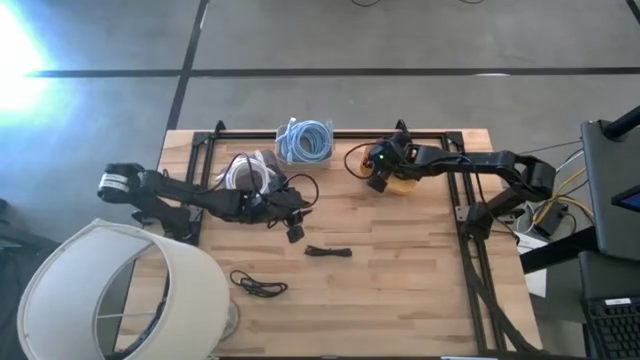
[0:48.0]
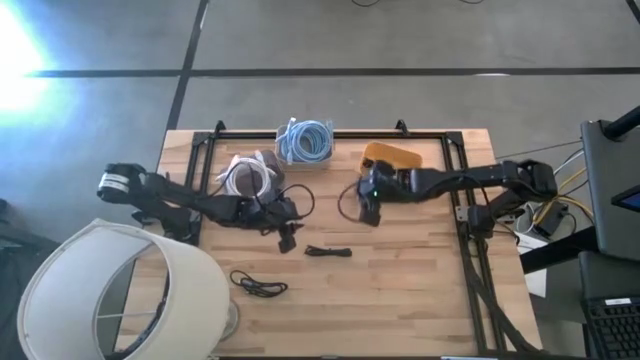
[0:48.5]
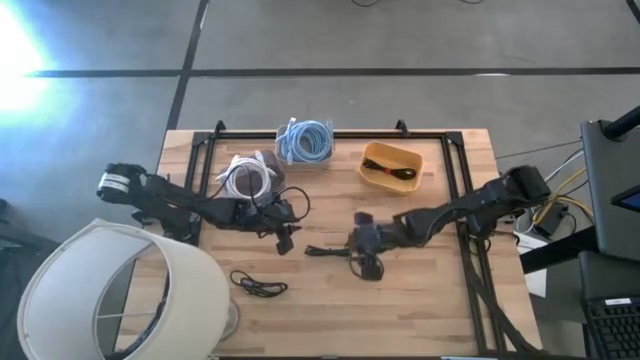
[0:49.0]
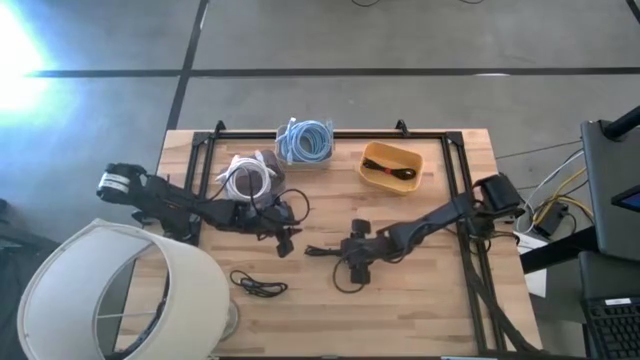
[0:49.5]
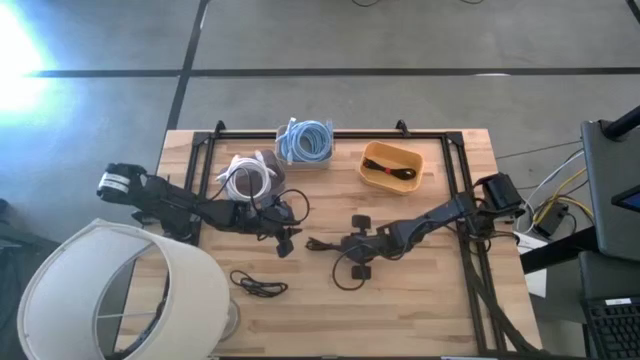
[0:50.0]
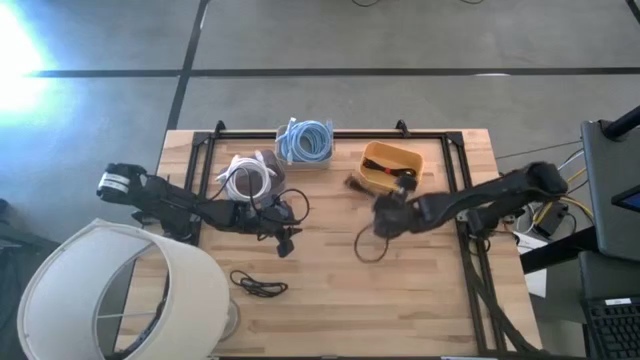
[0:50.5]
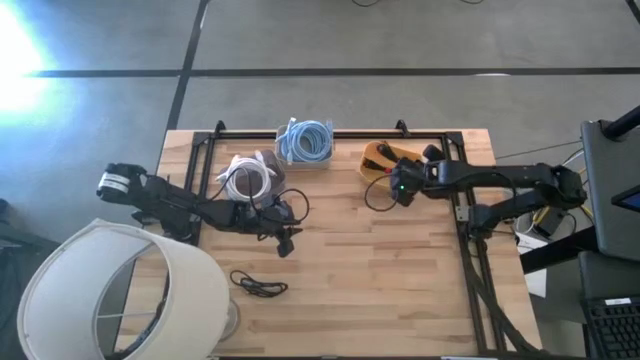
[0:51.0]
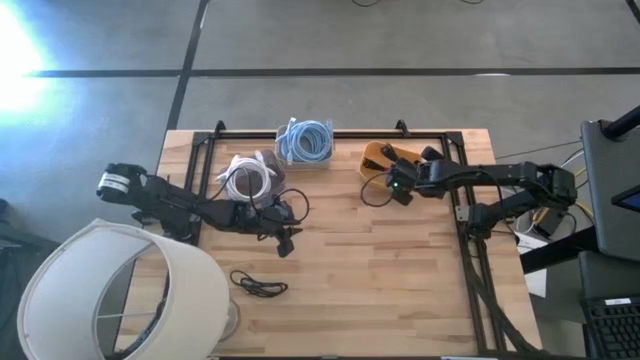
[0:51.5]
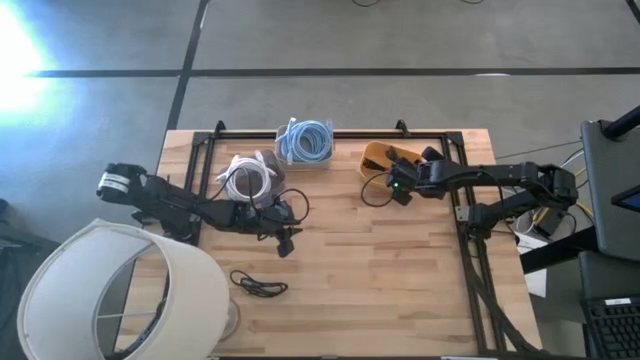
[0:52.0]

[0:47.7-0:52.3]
Task: Pick & Place USB Port
Put the right black USB cable into the yellow bin

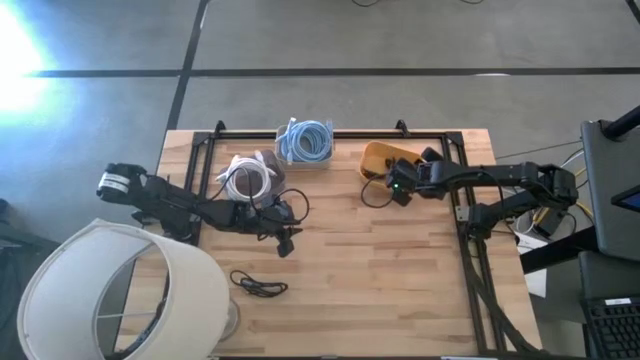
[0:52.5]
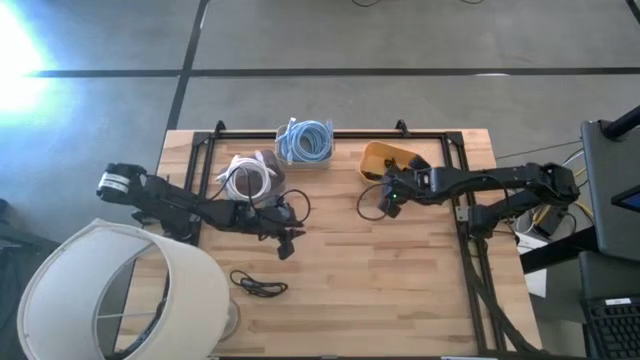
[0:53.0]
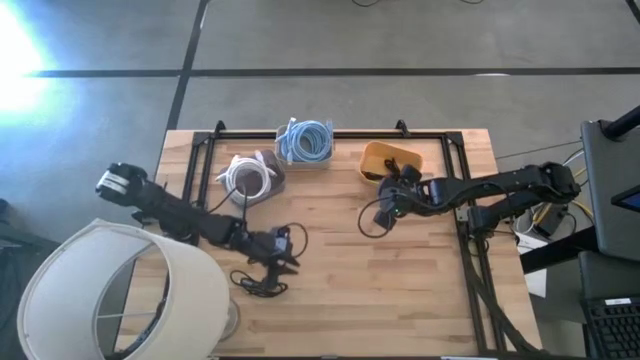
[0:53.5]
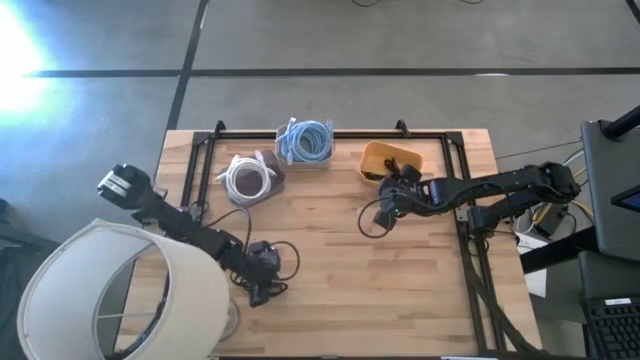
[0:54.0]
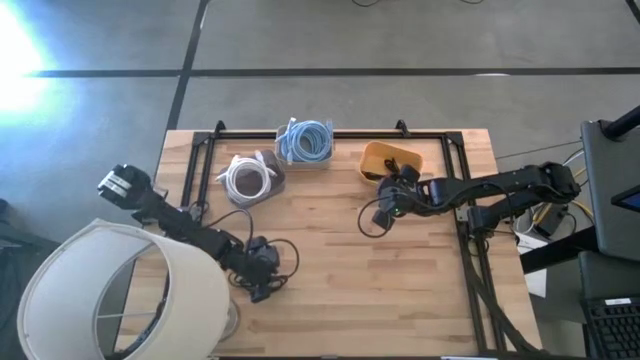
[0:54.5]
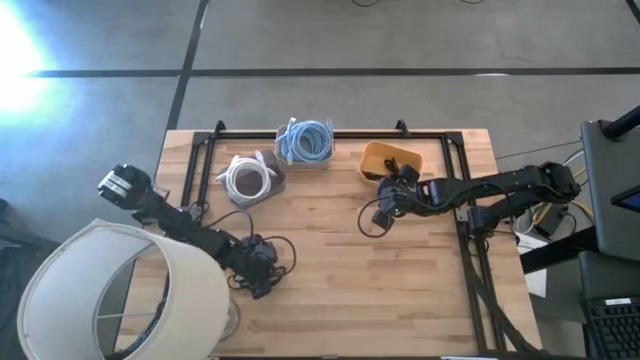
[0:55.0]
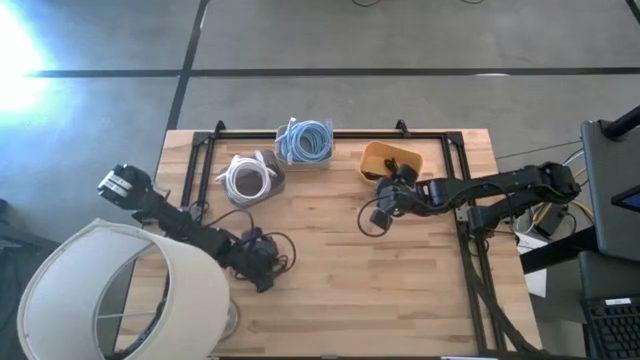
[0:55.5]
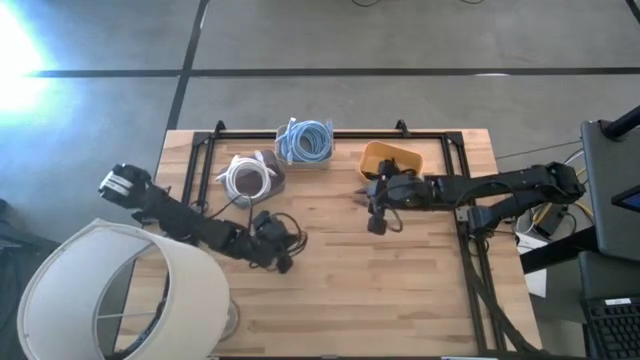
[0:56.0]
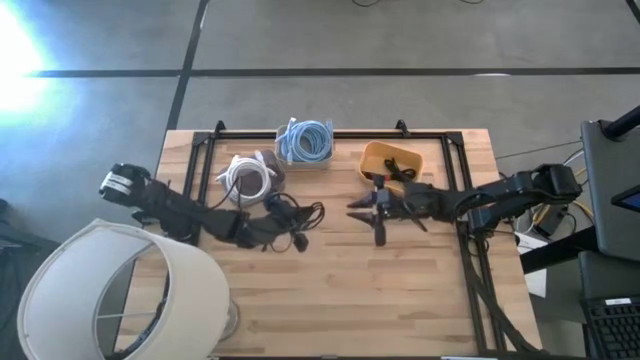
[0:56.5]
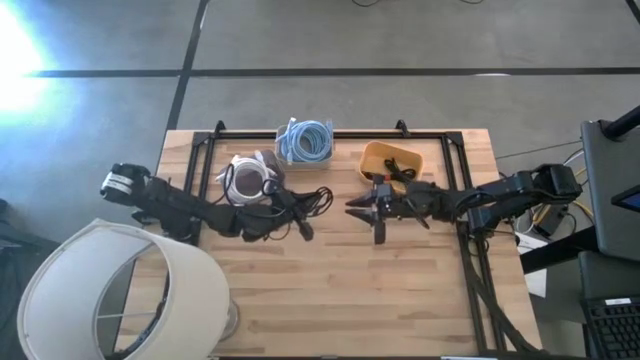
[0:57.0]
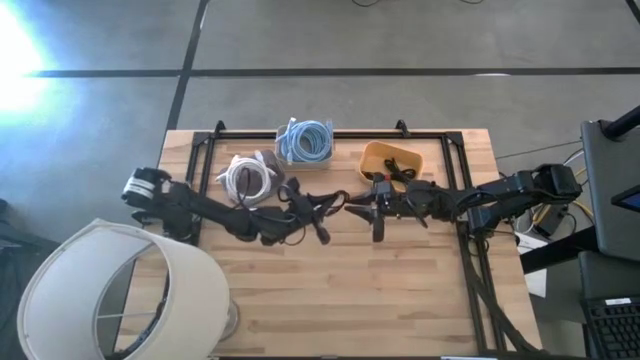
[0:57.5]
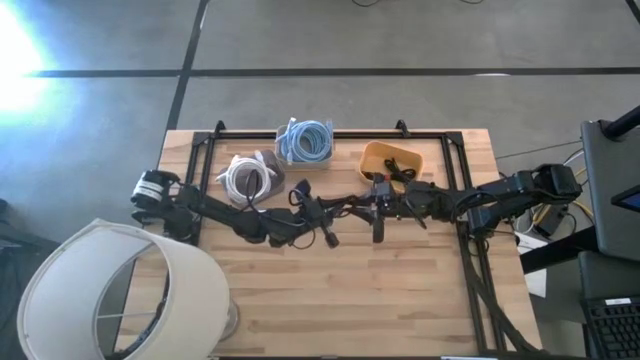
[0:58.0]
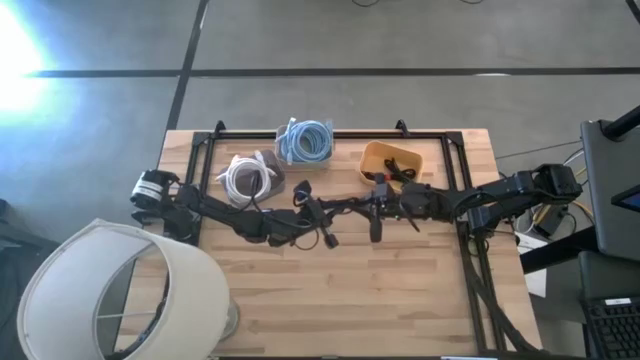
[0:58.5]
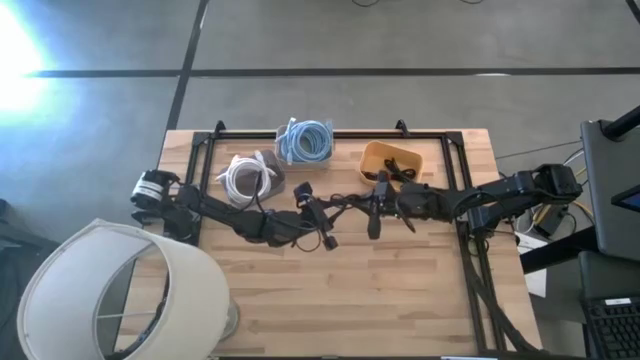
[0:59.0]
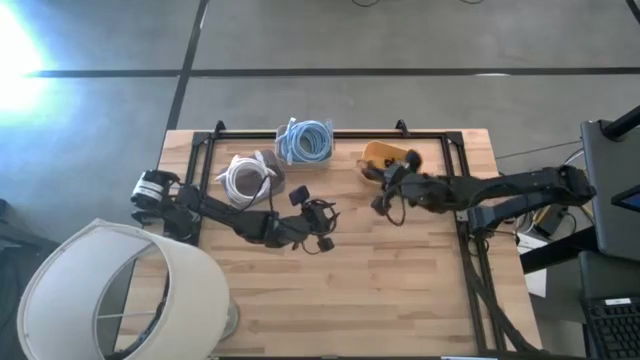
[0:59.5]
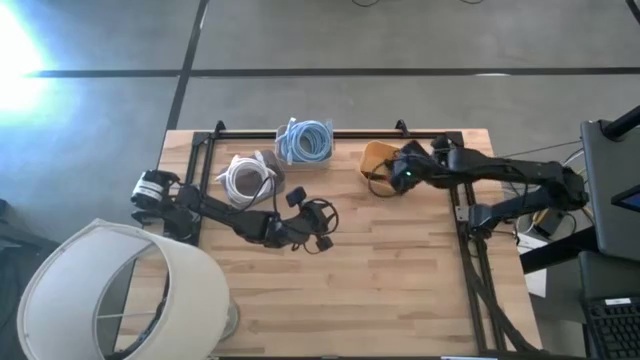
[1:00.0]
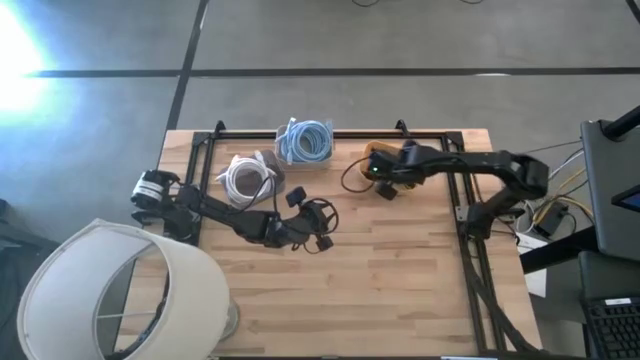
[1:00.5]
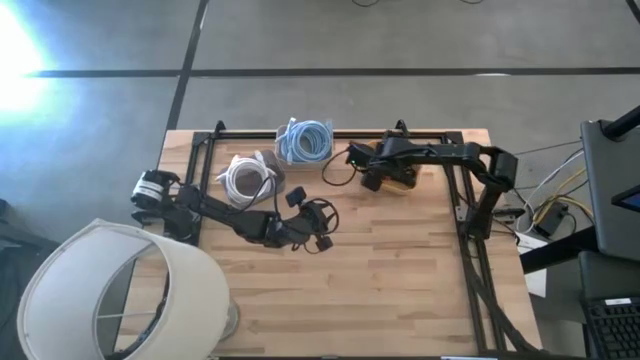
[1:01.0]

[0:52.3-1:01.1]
Put the black USB cable into the yellow bin

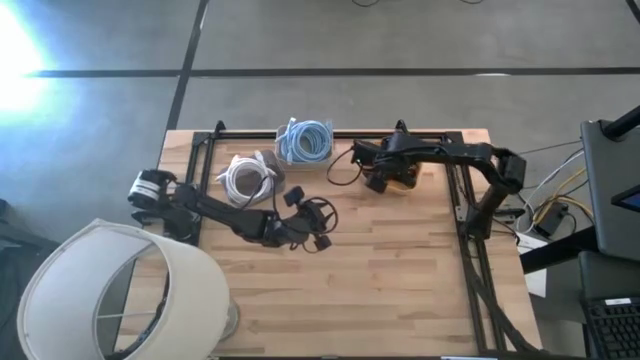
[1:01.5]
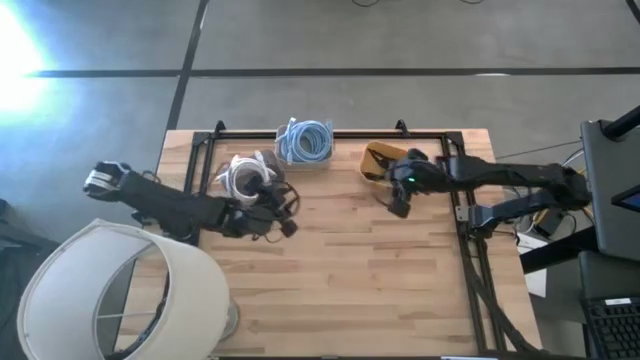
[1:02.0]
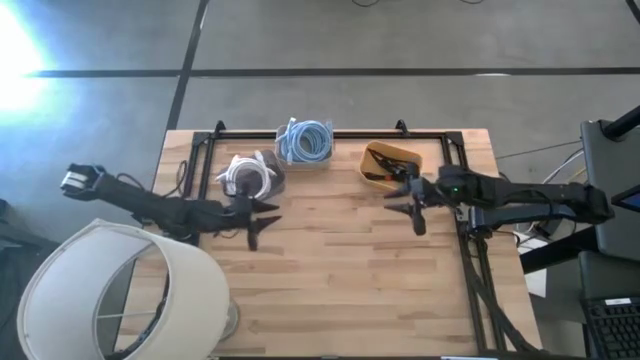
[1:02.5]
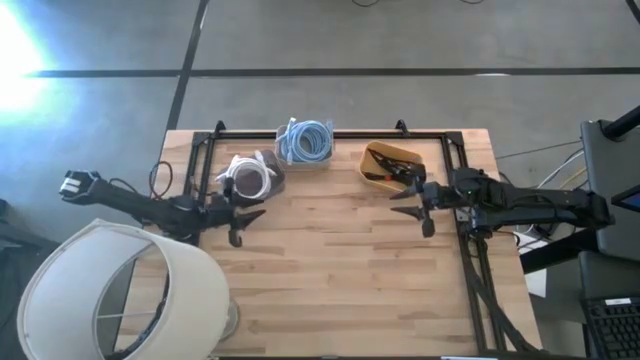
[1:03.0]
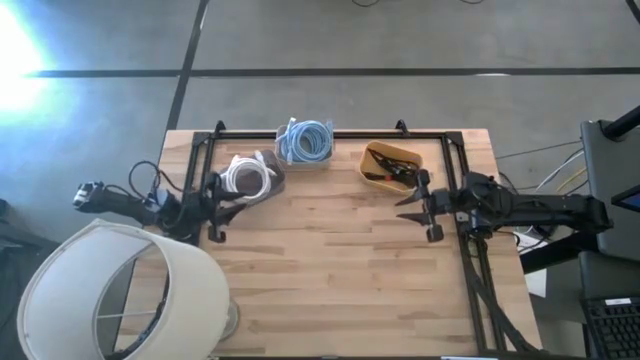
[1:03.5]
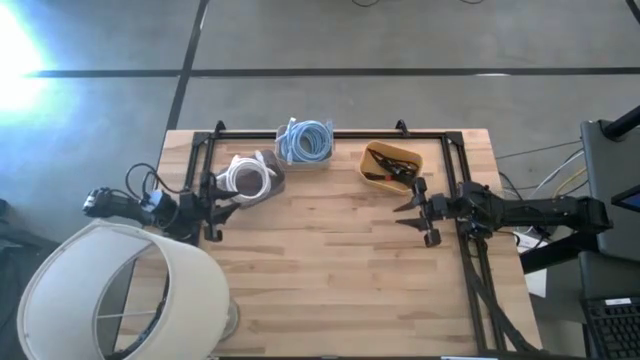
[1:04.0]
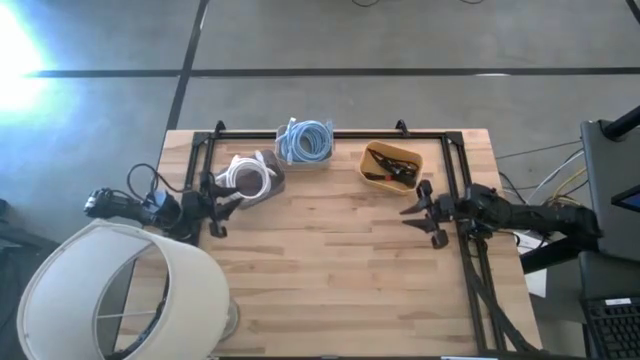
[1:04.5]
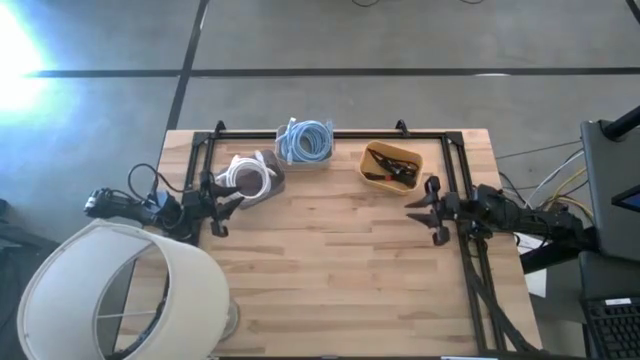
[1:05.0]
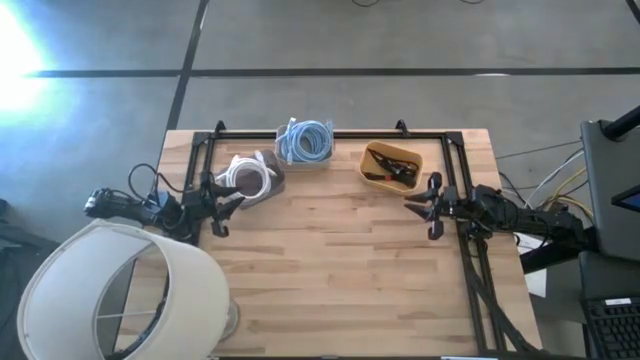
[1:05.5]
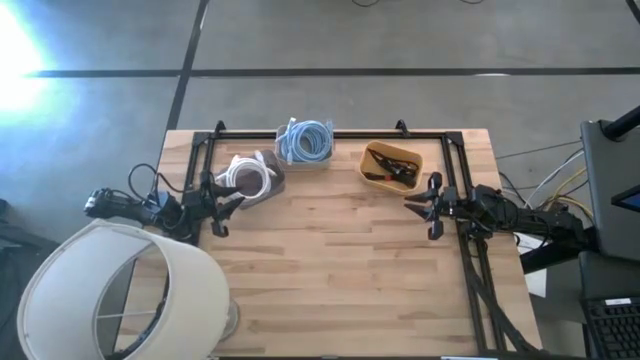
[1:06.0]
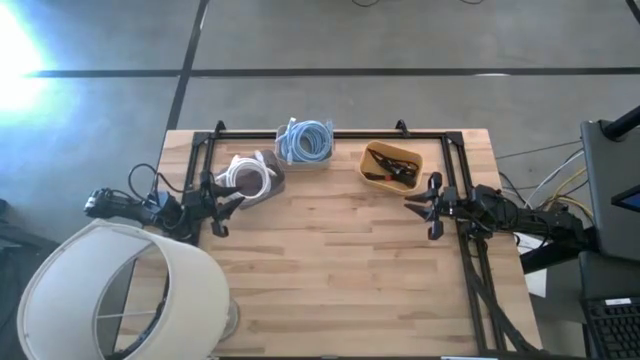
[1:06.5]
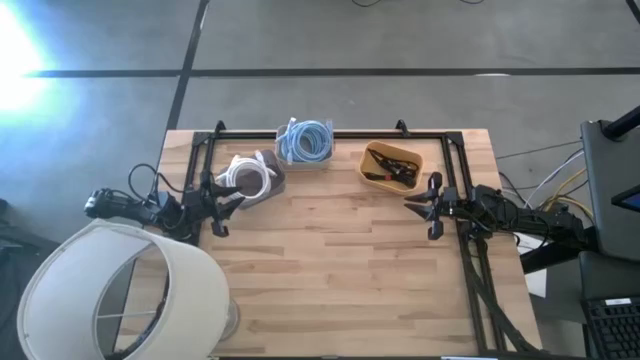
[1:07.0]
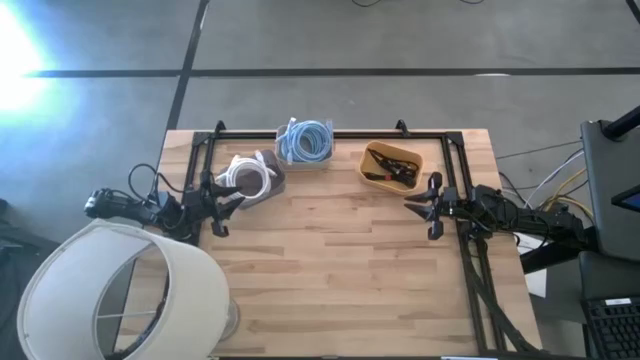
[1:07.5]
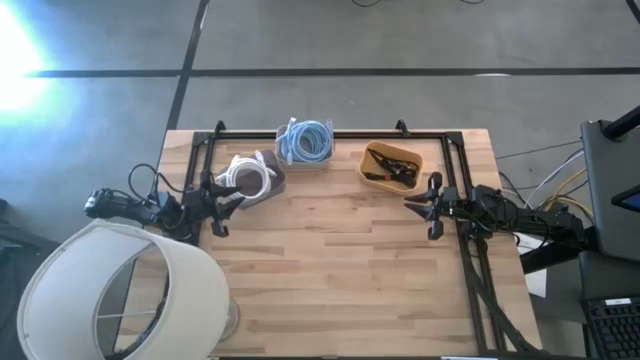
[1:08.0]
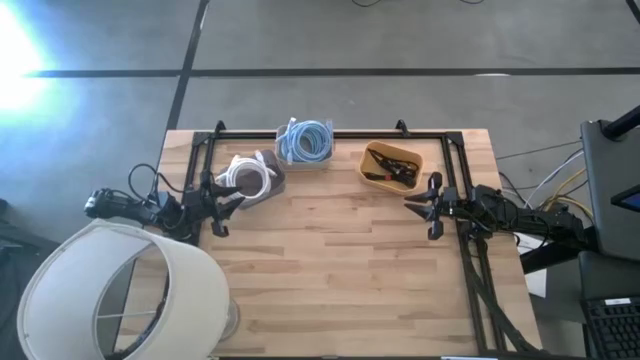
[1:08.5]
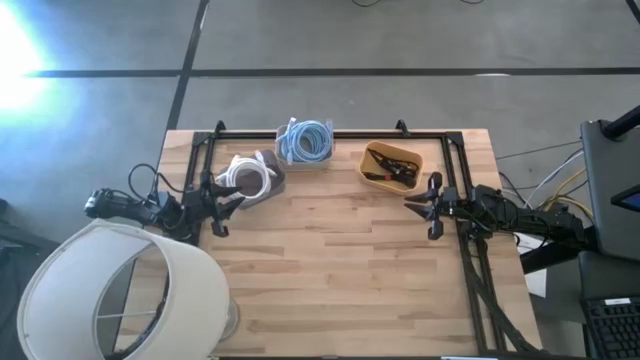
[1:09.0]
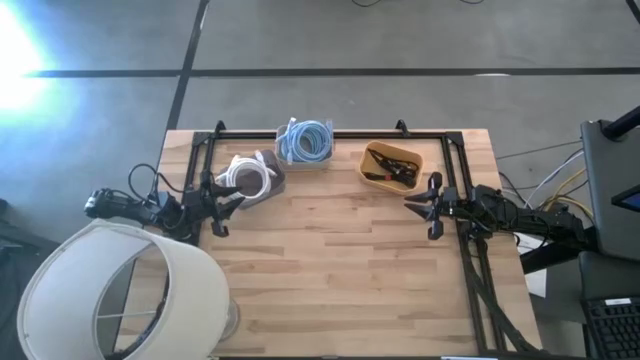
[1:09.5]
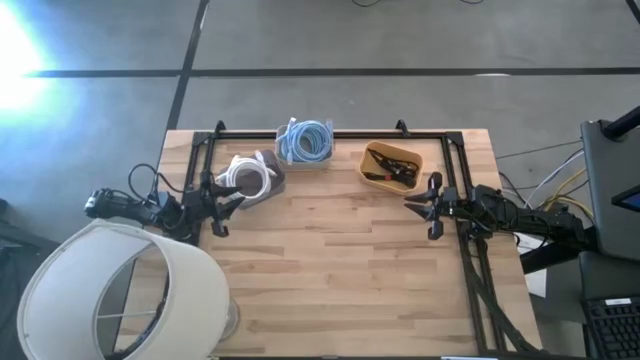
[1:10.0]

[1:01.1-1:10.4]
Return to Home Position
